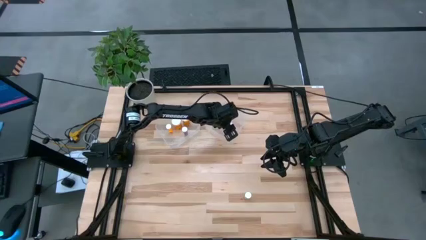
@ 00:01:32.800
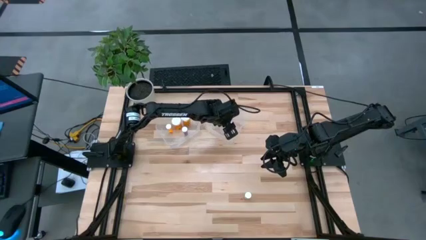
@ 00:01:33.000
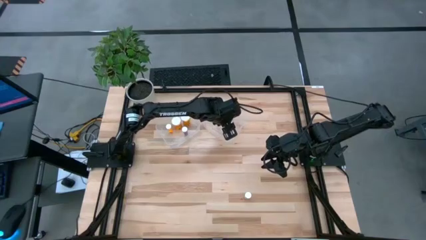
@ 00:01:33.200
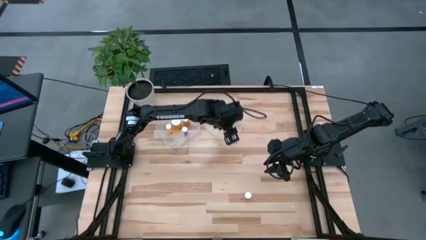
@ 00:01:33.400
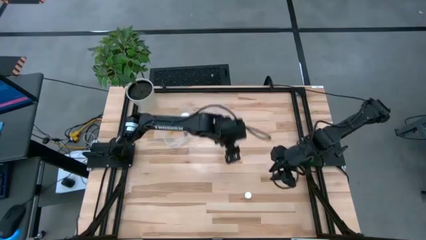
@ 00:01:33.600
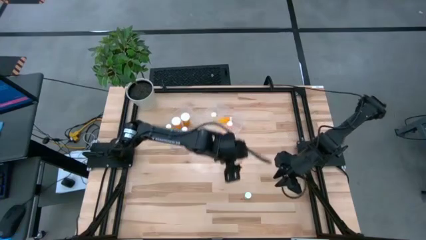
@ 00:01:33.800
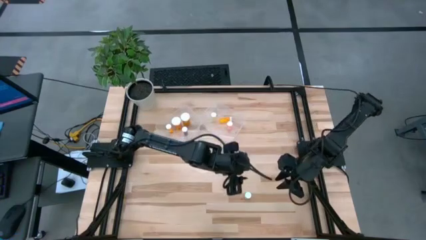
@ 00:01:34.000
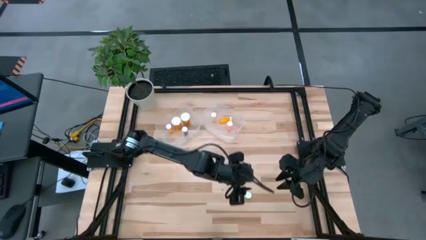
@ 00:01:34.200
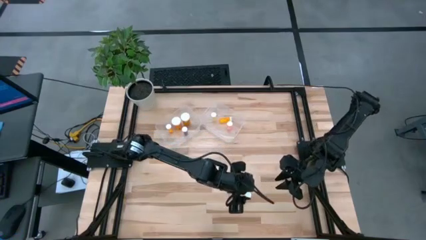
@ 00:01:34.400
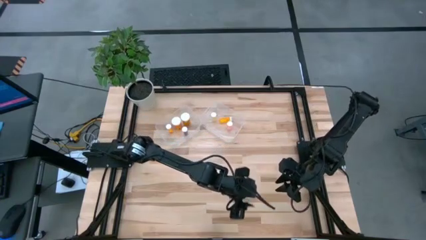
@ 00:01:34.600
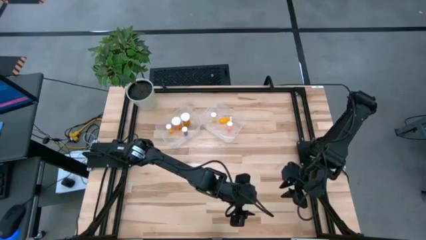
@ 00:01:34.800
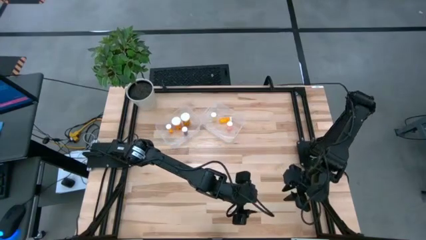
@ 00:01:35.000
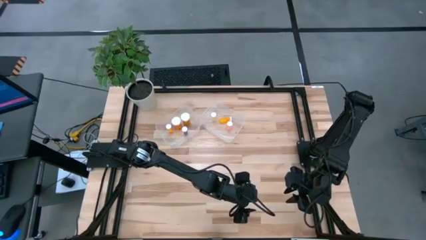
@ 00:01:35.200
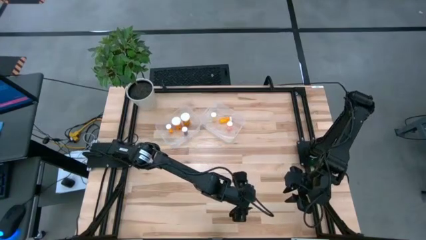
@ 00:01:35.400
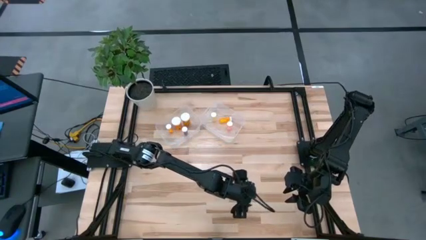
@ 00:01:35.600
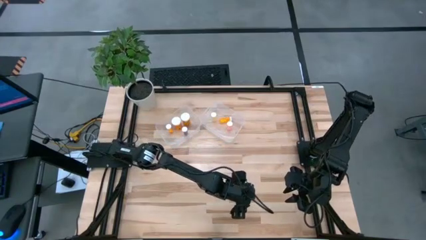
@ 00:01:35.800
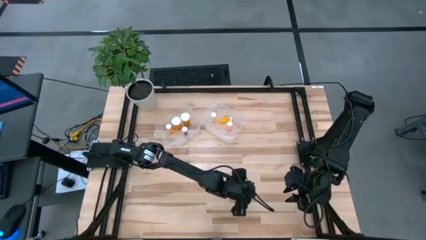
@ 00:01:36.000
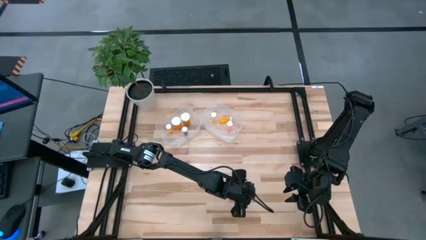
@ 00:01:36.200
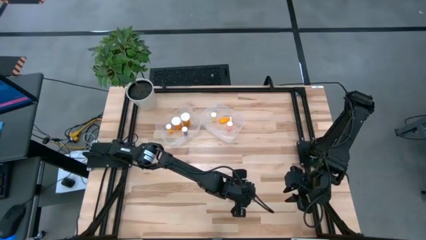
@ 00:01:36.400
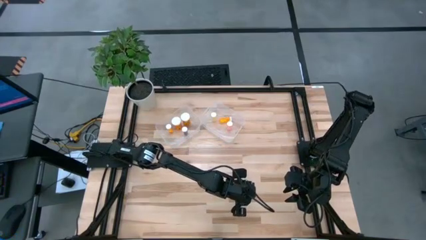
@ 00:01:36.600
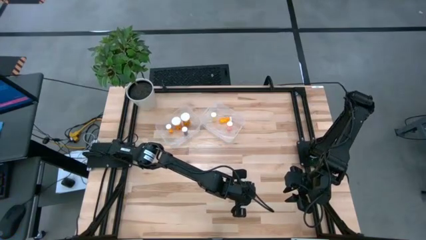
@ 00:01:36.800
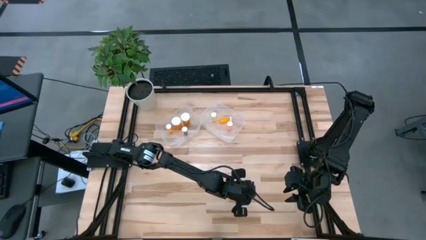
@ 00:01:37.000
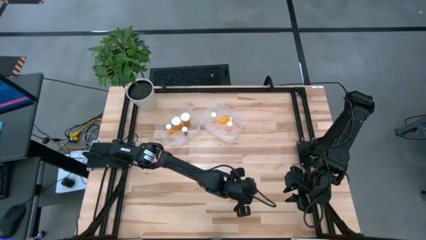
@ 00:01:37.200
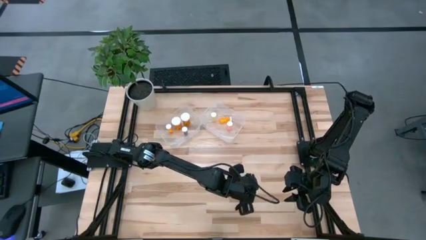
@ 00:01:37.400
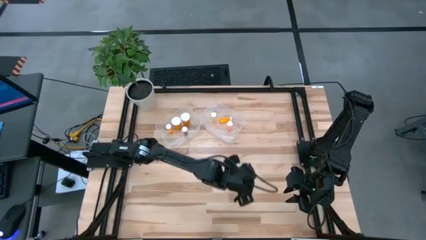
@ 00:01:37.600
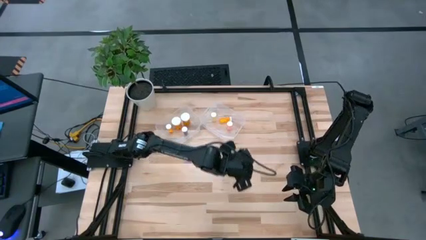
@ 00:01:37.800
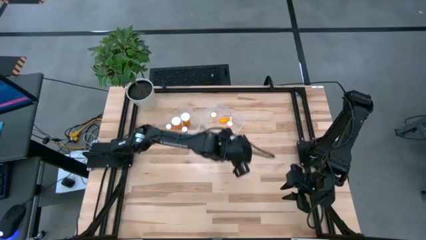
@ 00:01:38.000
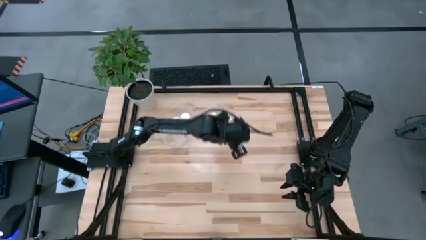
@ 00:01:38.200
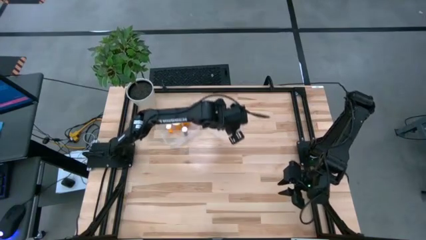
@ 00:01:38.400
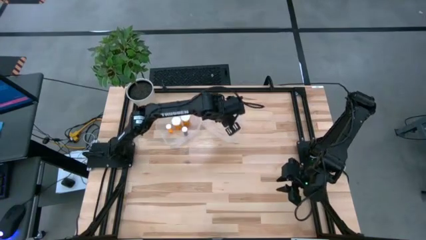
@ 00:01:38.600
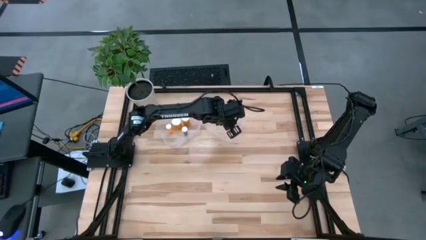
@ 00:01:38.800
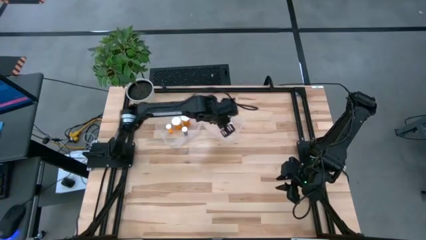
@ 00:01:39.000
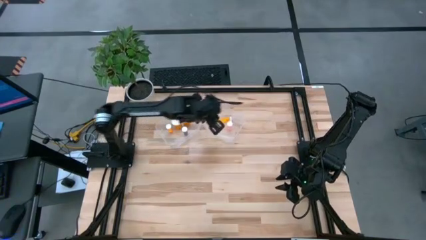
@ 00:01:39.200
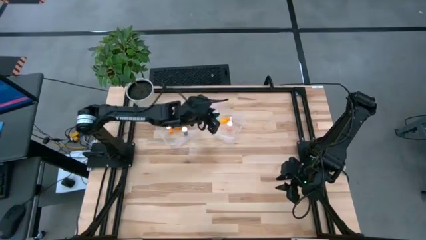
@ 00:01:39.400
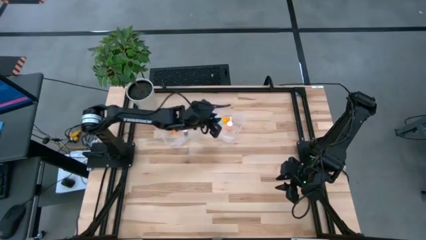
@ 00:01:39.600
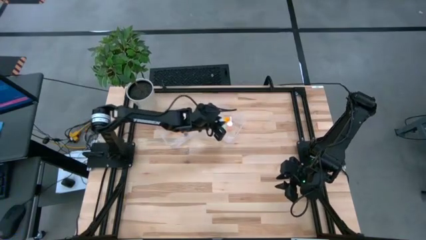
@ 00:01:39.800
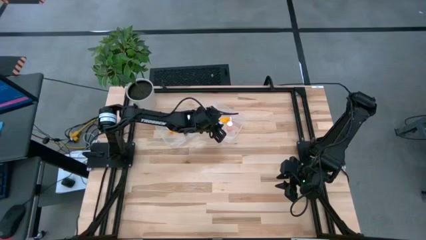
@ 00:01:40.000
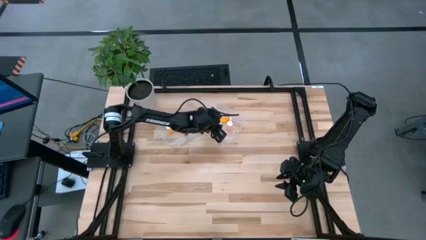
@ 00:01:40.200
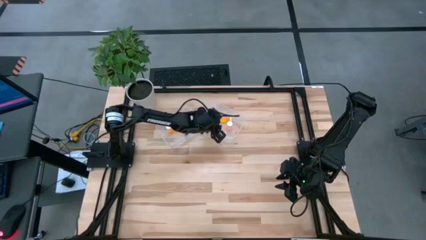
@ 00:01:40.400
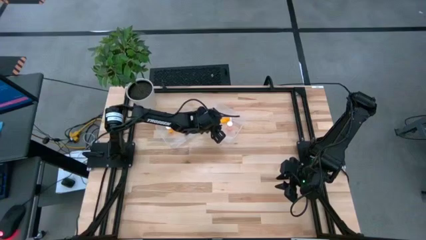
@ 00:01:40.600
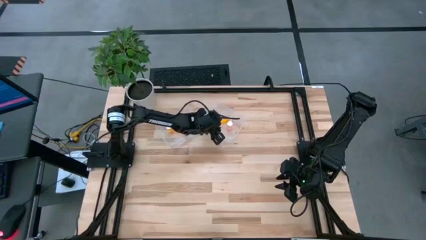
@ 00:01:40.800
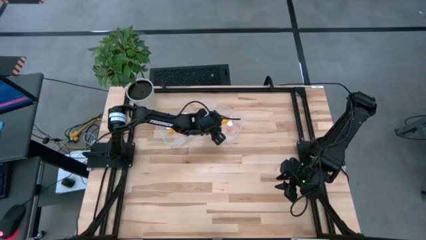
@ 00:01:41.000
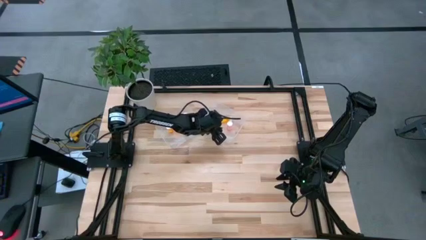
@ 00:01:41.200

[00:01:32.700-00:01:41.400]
Task: Pick and place medicine bottles into bin by pill shape (circle, oval)
Put the small green tablet bottle into the right transparent bin

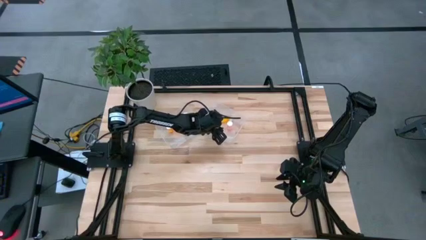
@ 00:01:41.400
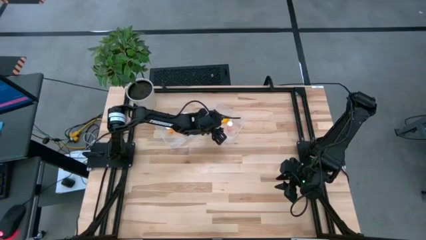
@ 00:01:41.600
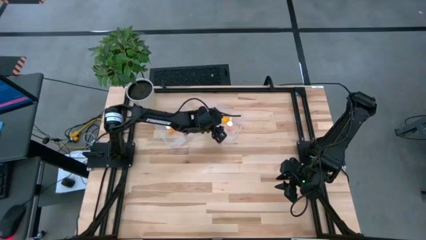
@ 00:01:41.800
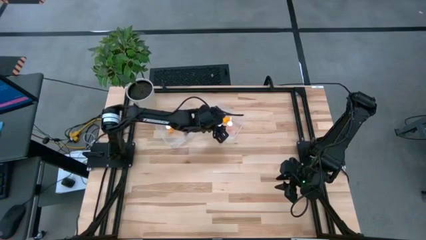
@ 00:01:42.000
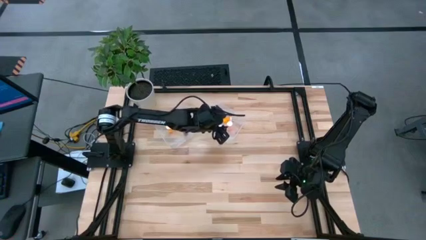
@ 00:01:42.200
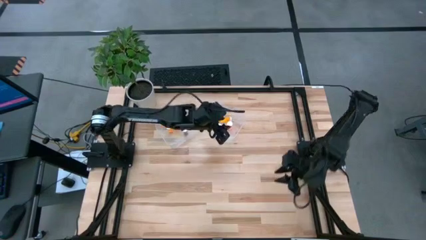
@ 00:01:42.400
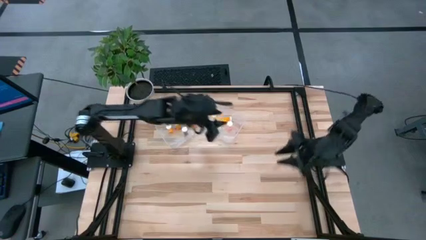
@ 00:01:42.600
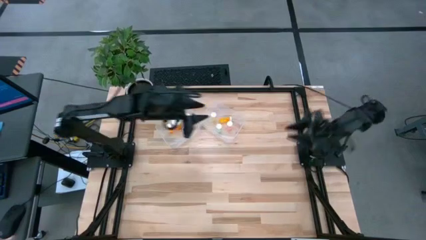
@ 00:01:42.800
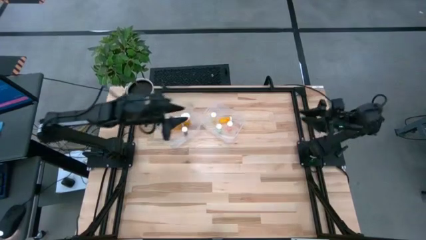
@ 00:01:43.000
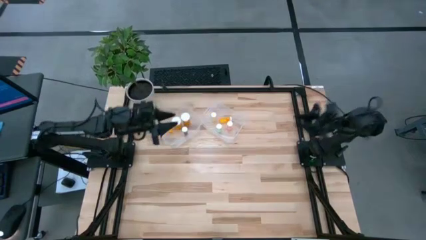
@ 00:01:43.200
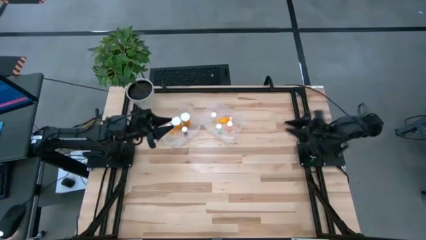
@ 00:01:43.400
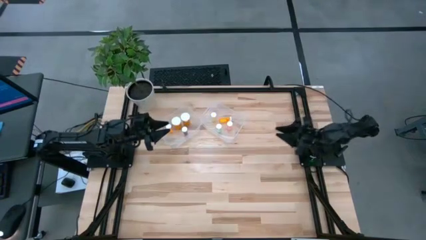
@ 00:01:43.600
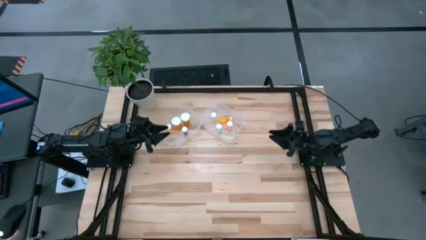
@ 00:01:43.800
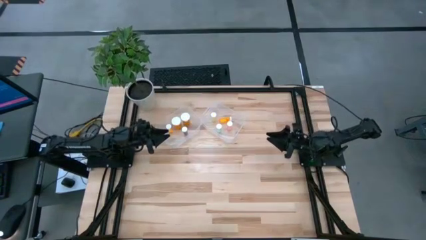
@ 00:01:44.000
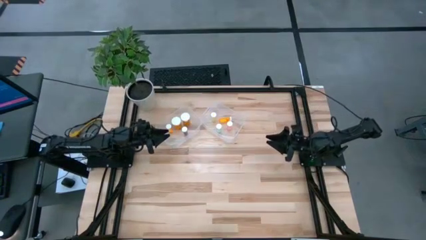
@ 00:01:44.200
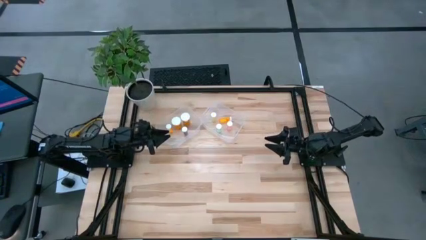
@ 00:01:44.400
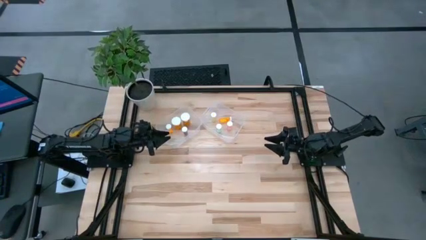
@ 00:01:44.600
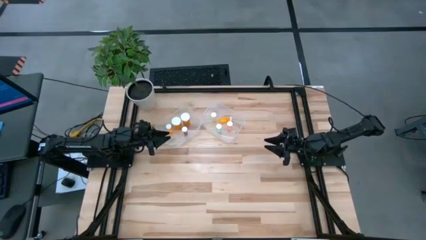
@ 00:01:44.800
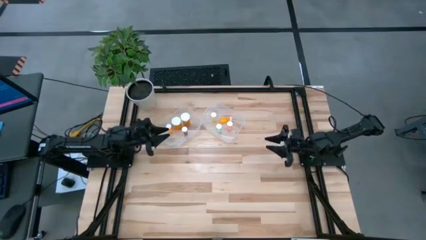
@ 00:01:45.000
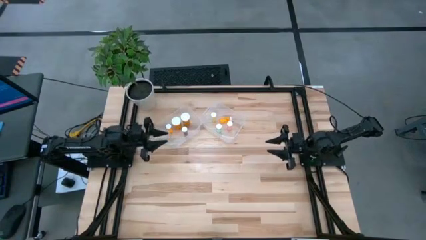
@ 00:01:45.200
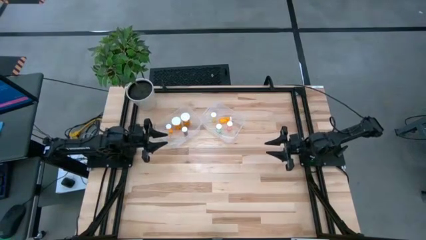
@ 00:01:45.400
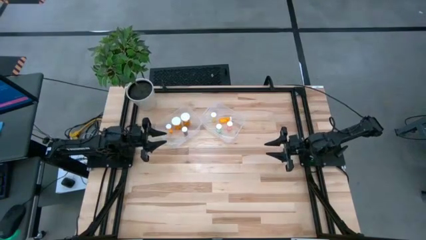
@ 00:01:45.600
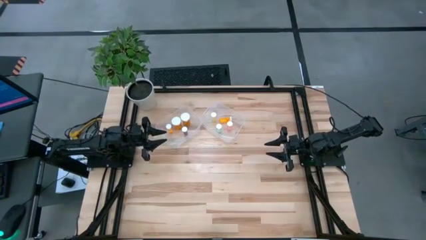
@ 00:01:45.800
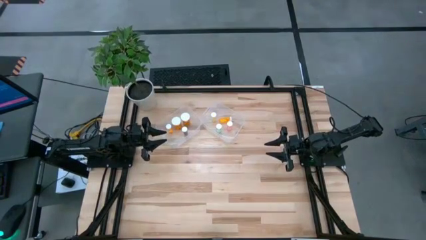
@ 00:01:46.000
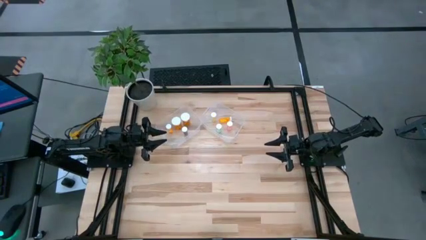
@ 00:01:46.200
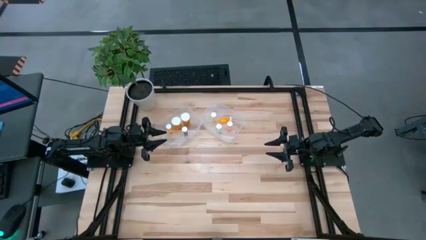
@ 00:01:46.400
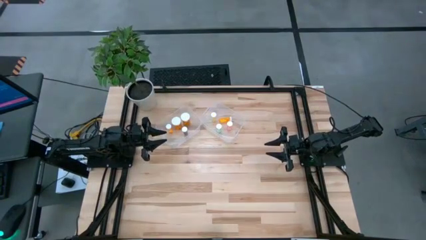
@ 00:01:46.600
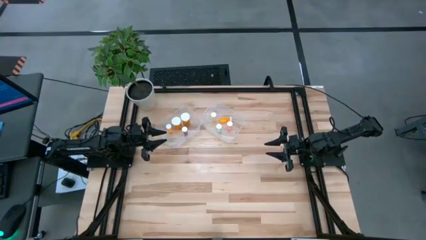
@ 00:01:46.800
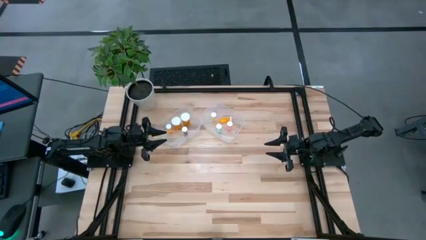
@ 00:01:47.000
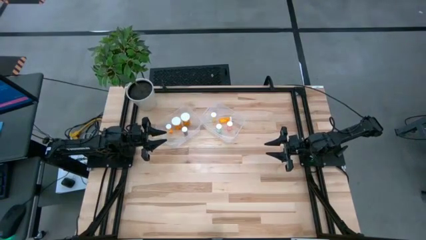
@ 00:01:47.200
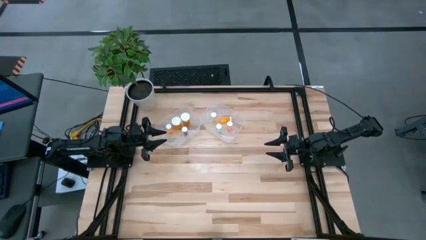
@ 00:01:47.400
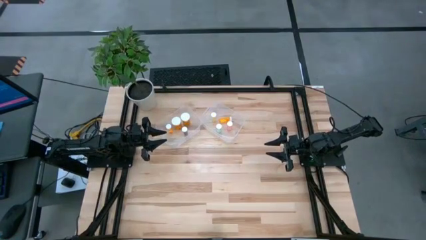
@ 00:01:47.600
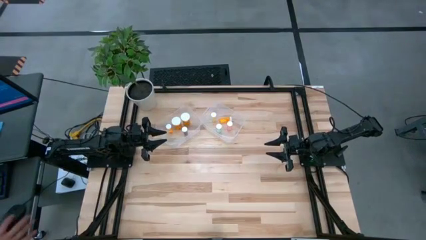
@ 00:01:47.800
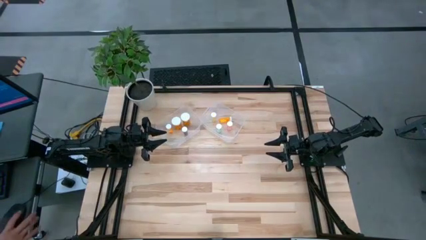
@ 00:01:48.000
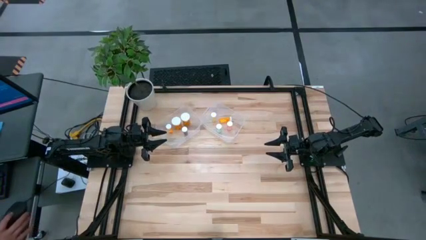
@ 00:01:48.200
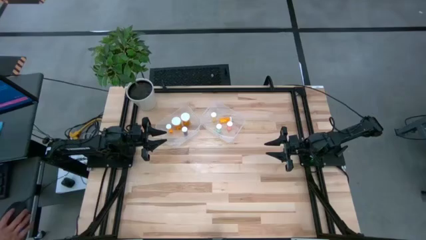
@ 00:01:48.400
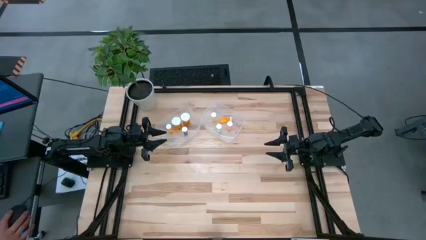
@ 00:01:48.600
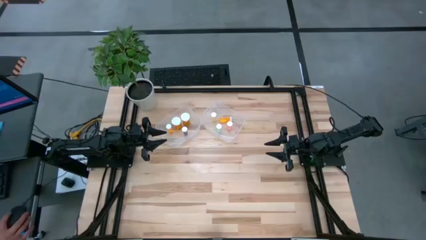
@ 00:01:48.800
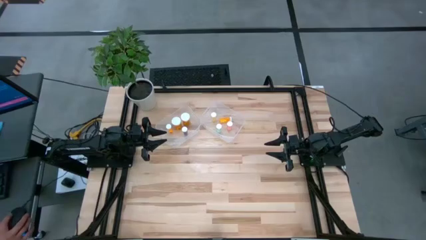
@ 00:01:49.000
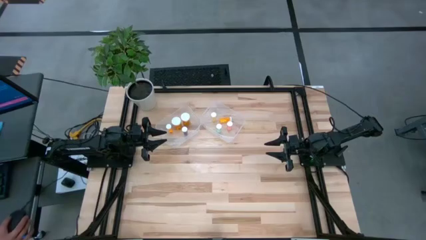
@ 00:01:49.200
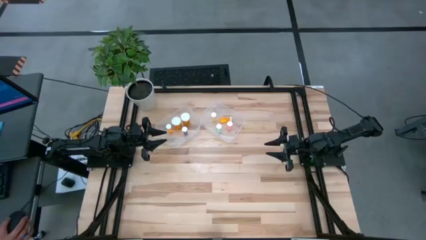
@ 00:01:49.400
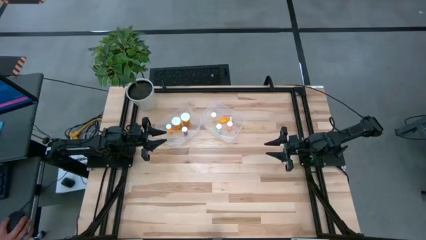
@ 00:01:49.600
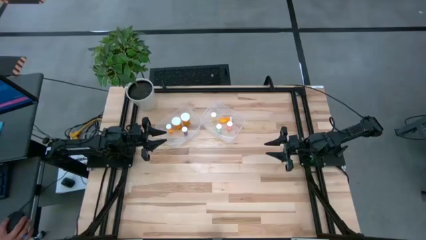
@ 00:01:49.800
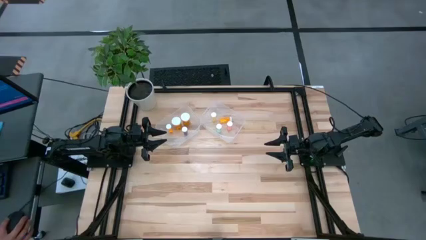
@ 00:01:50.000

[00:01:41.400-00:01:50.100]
Return to Home Position
